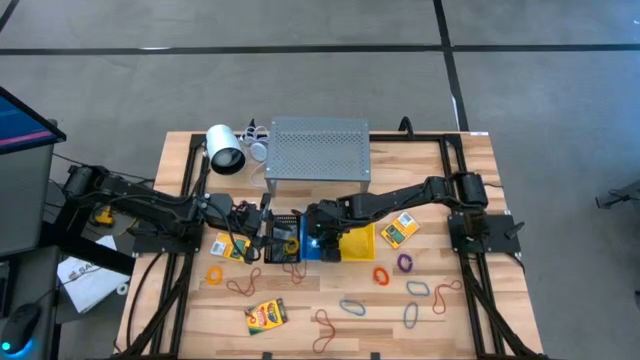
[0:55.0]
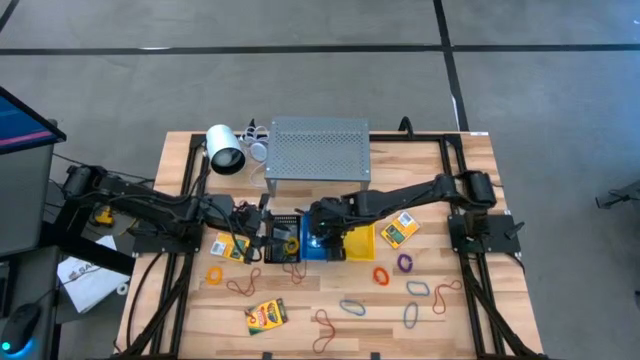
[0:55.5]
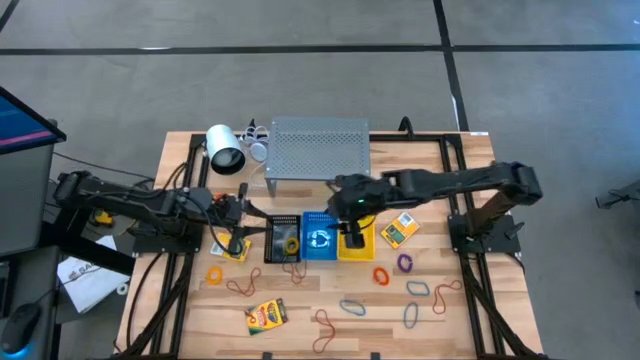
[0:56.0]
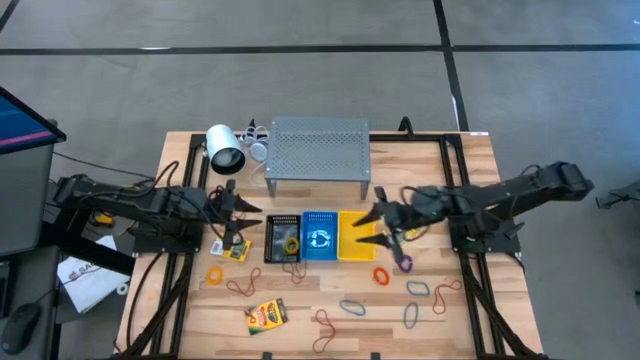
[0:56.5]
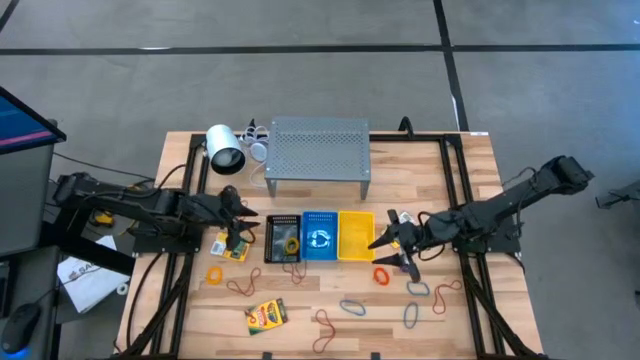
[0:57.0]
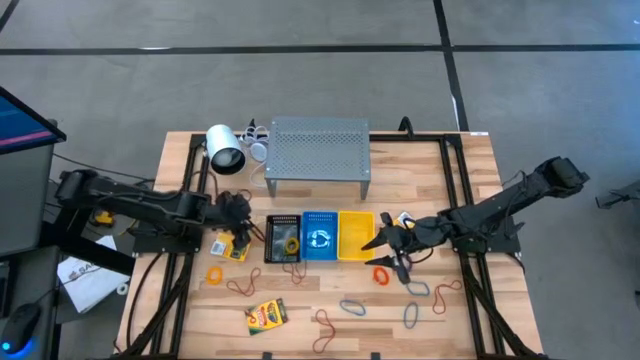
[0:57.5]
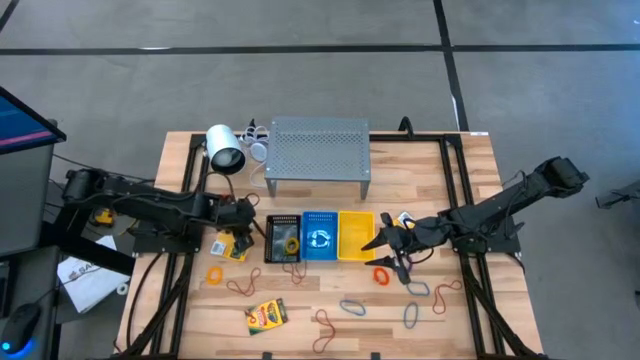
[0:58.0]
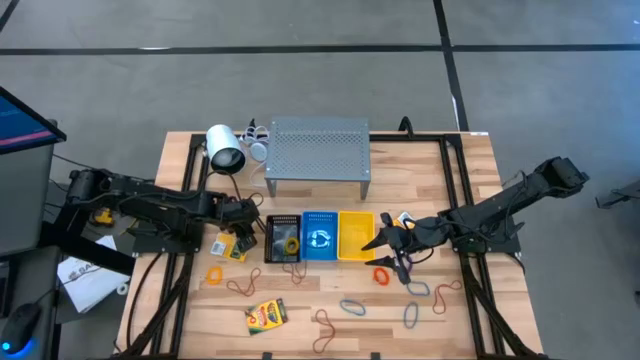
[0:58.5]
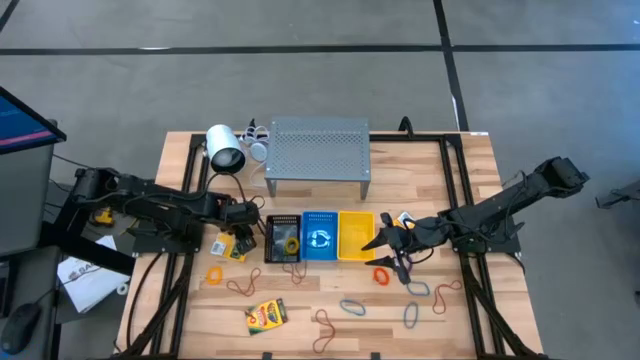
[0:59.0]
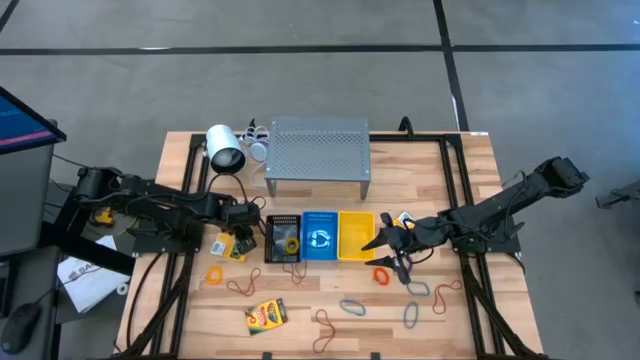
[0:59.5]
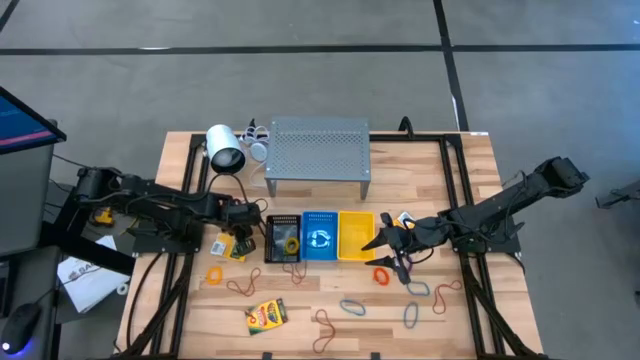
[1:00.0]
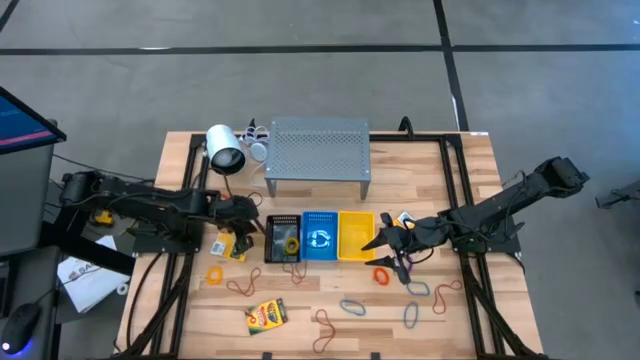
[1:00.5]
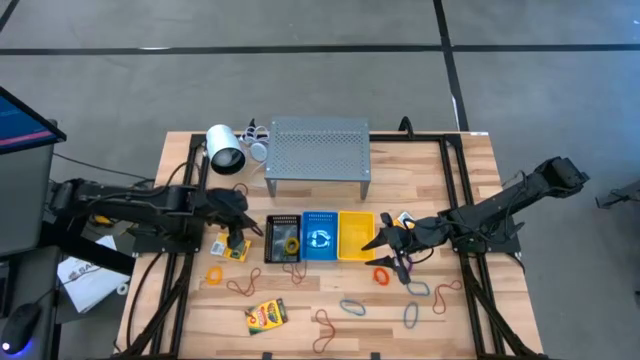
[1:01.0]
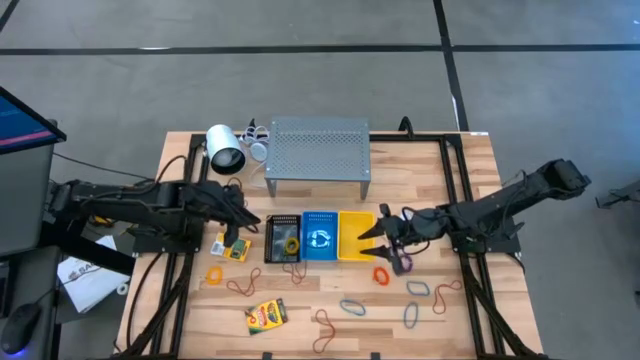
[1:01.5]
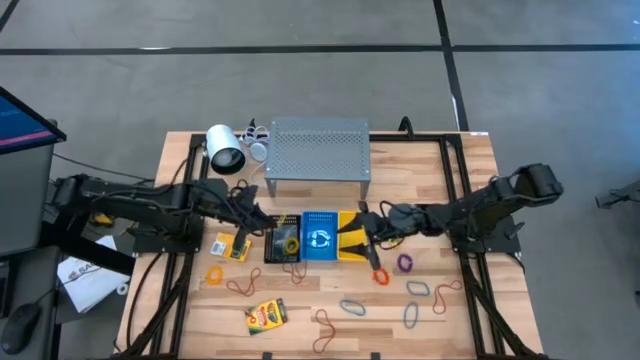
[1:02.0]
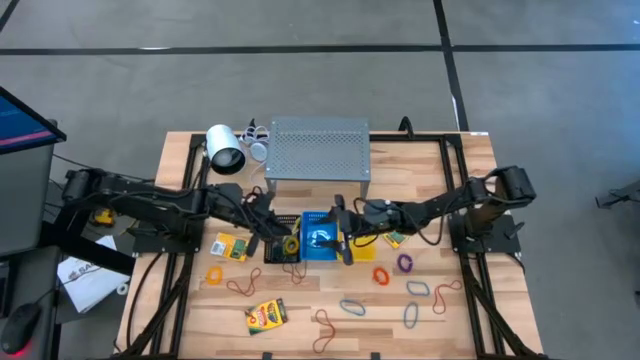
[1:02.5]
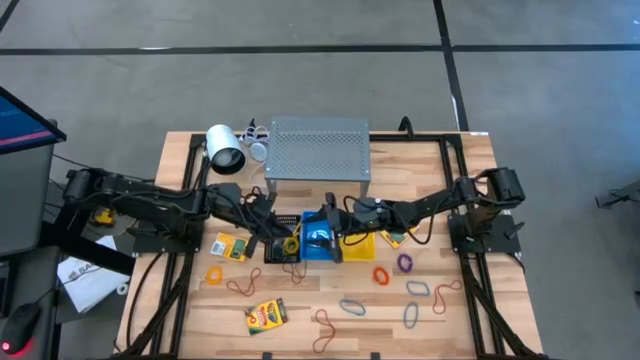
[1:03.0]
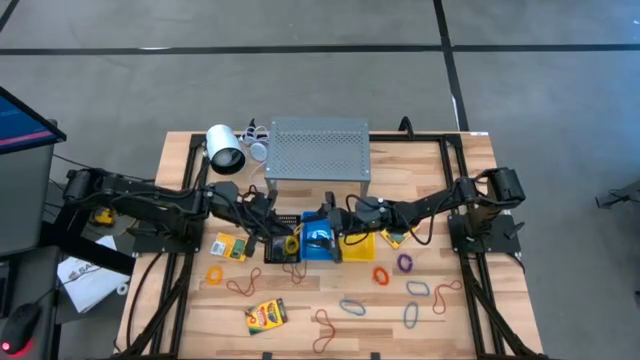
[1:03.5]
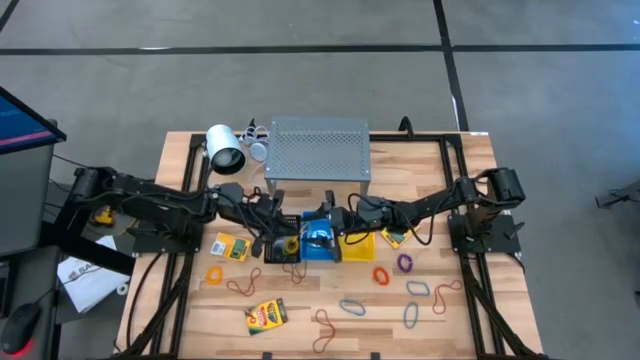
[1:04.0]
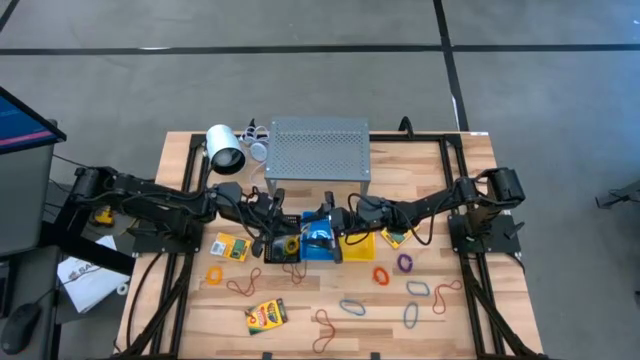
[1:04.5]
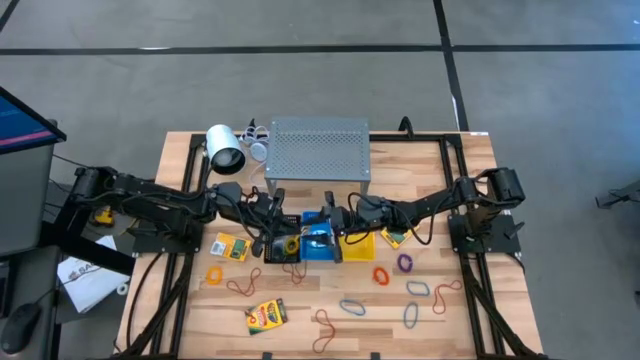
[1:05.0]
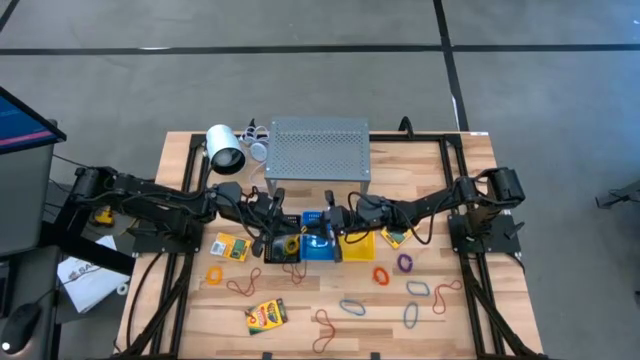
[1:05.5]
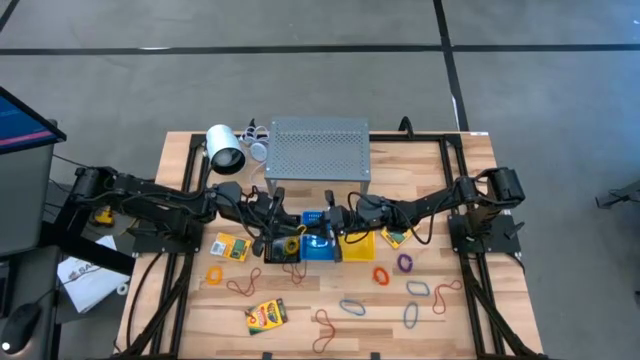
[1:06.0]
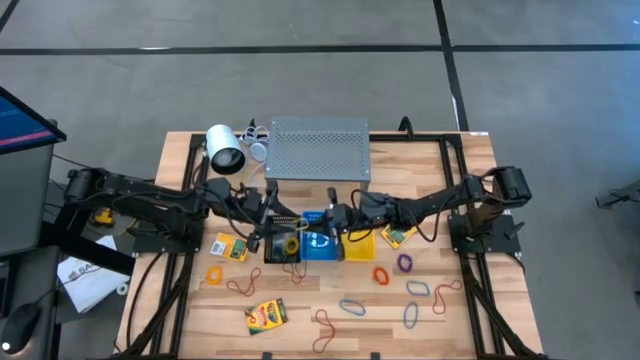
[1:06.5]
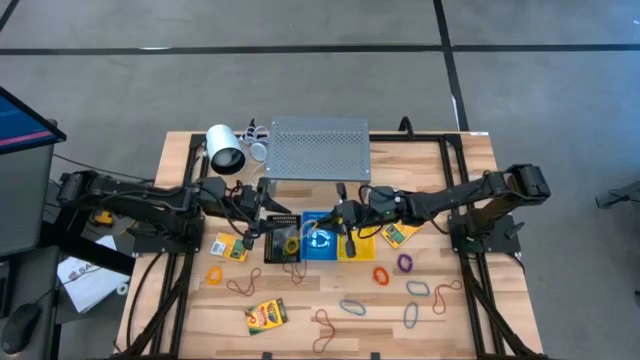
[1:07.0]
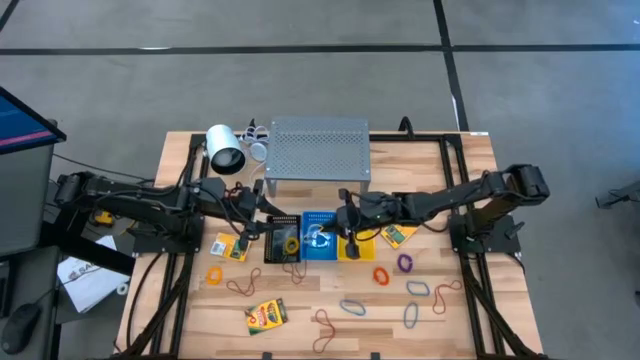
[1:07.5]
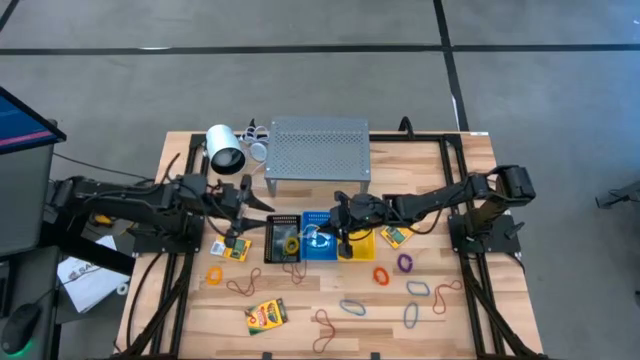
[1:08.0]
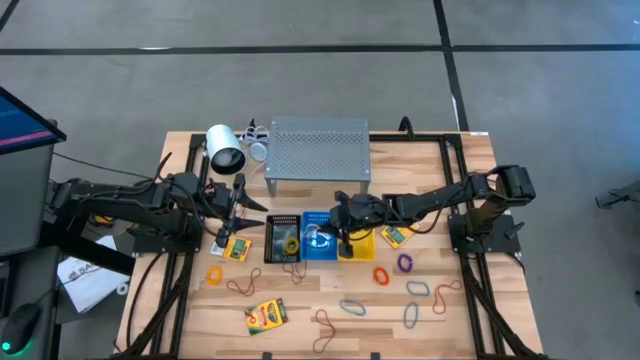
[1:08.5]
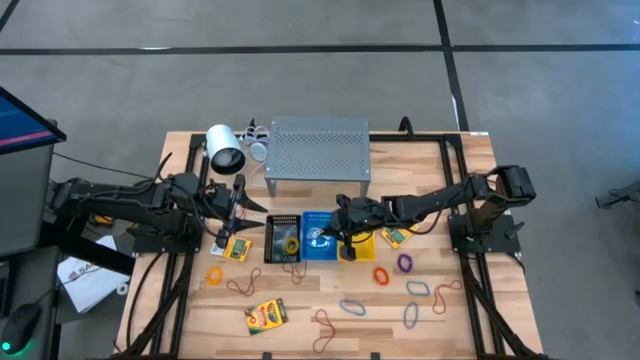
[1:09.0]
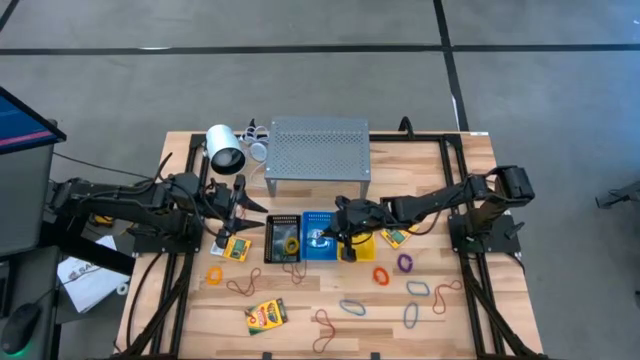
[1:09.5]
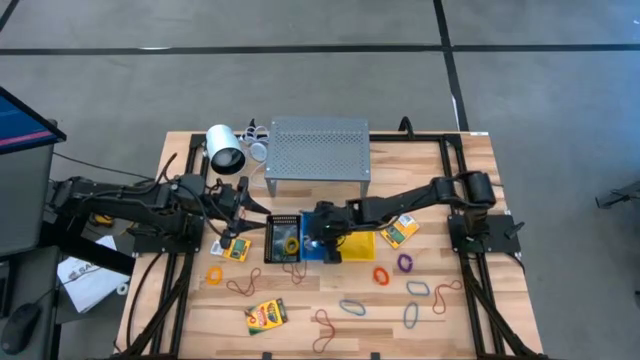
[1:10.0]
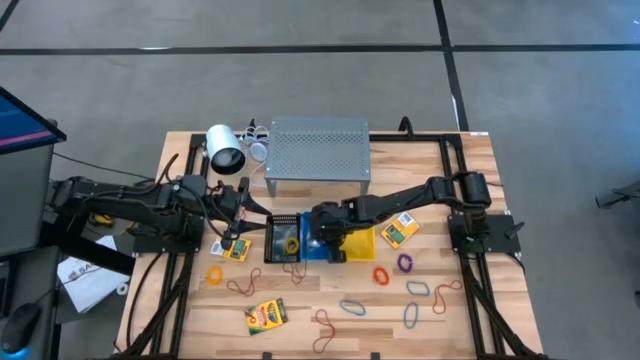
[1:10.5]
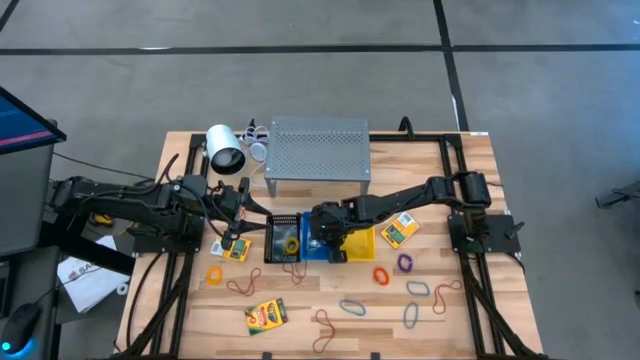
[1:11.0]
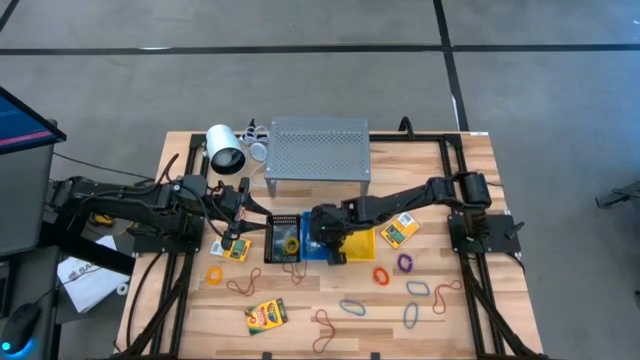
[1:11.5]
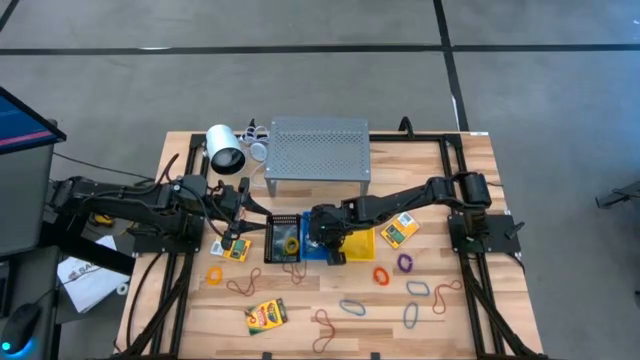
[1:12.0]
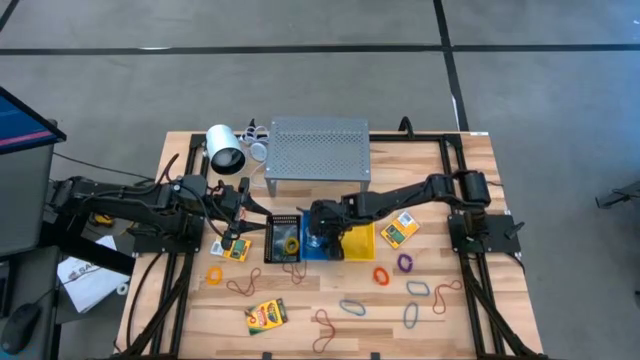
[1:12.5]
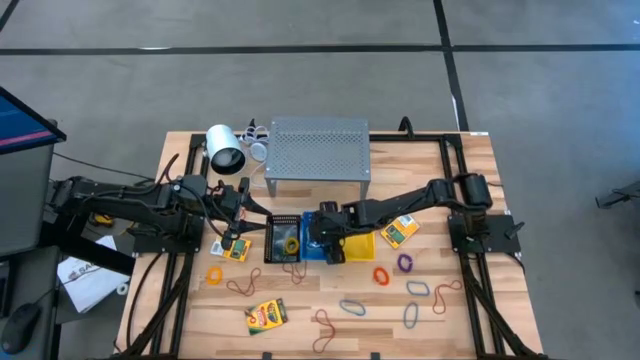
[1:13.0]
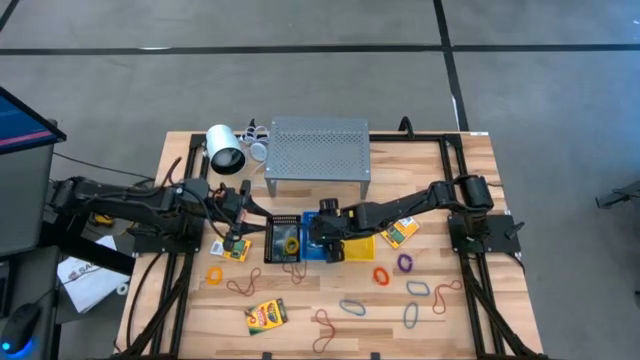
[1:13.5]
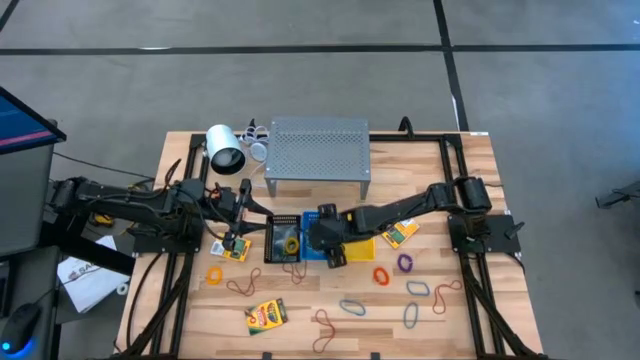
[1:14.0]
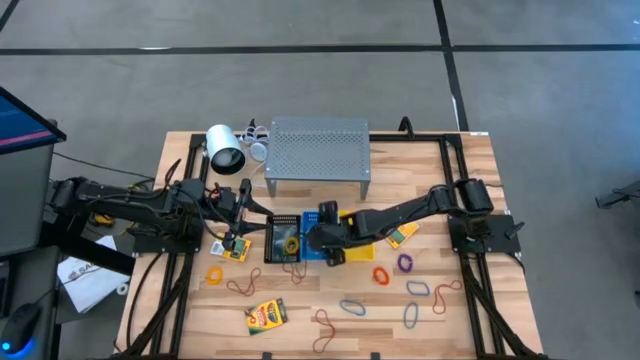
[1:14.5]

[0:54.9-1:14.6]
Task: Pick & Place Office Desk Supplies
Put the yellow rubber band into the blue basket

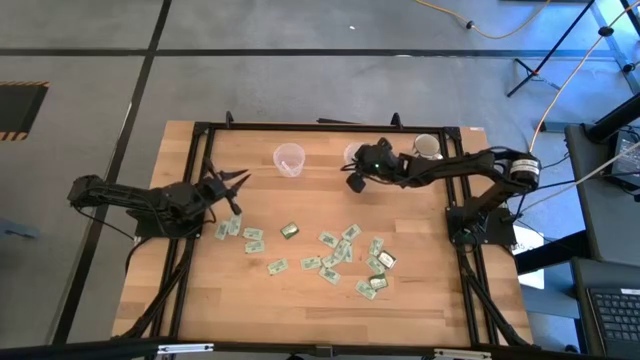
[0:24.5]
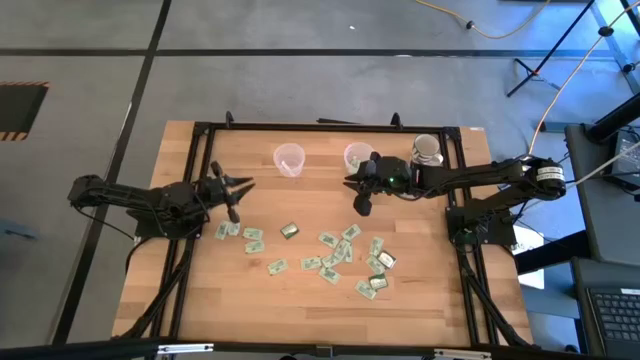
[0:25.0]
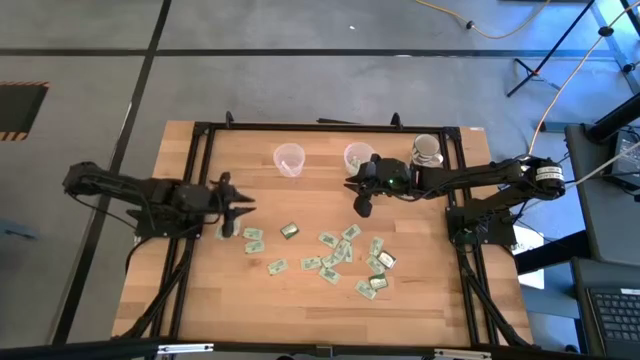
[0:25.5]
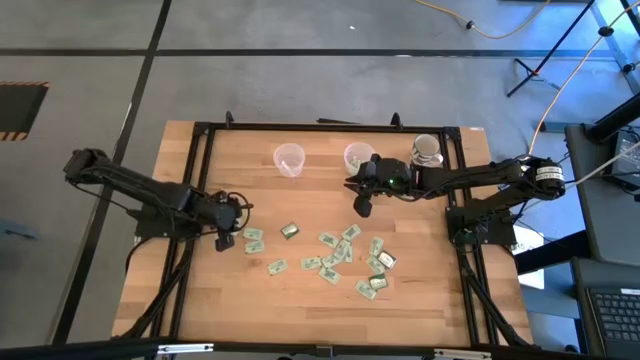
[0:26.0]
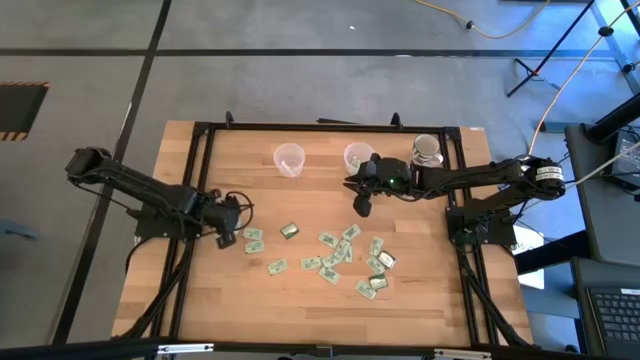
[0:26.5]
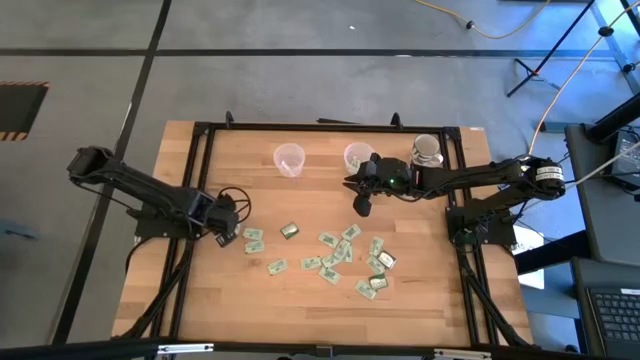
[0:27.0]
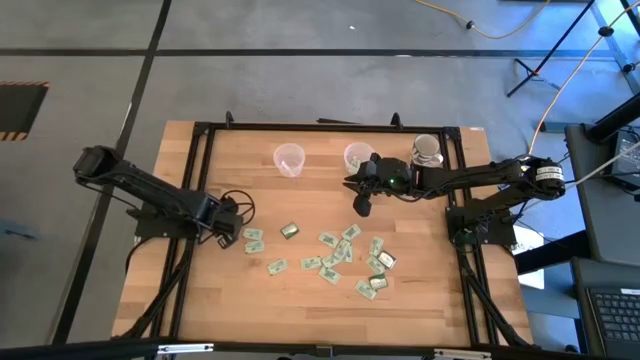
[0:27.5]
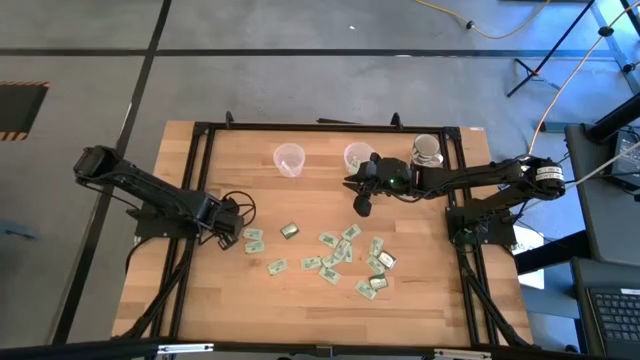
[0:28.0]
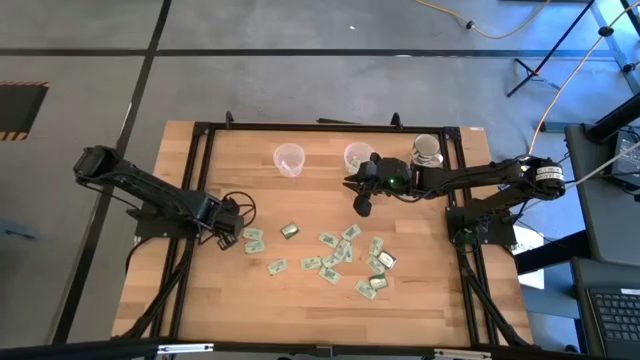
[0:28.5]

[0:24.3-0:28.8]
Task: Pick and place Stevia / Truvia into bins
Put the stevia packet into the right transparent container
